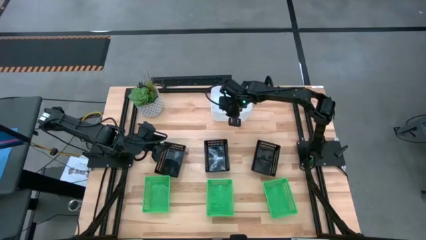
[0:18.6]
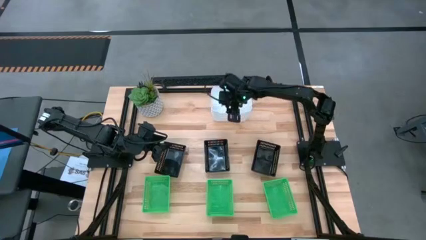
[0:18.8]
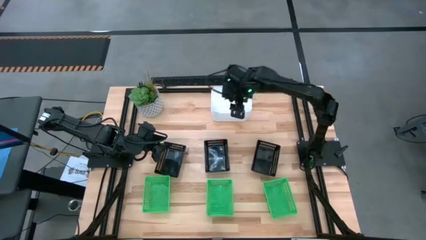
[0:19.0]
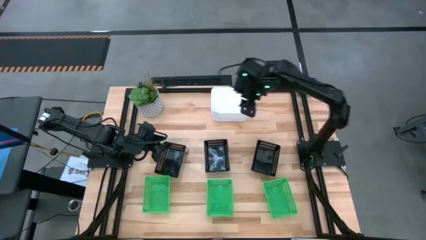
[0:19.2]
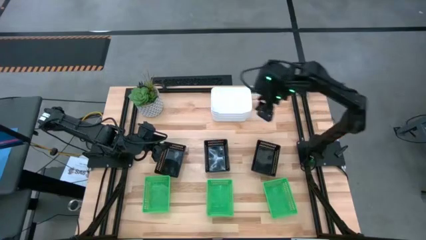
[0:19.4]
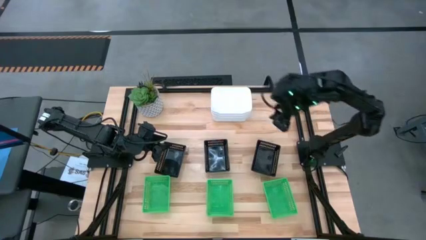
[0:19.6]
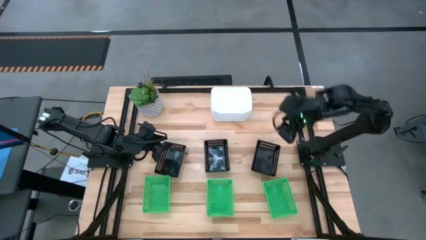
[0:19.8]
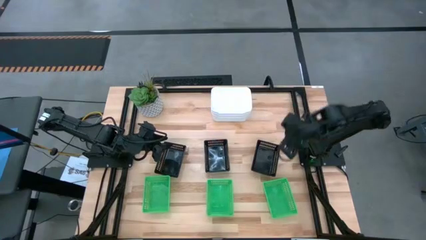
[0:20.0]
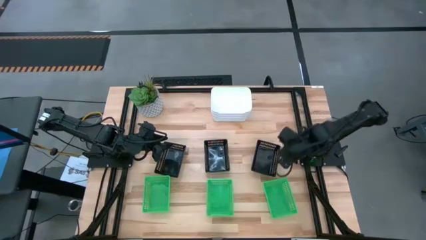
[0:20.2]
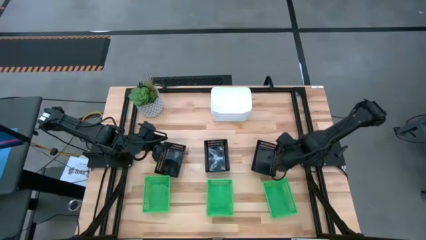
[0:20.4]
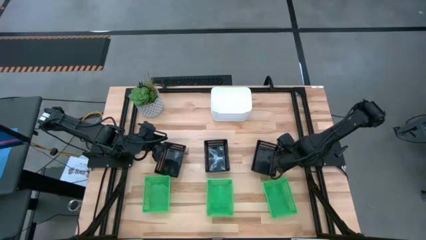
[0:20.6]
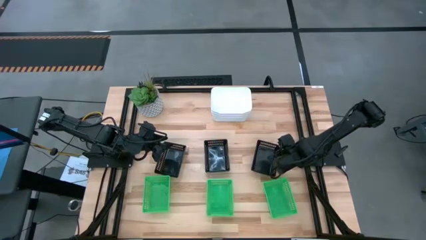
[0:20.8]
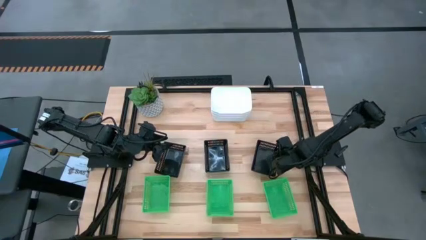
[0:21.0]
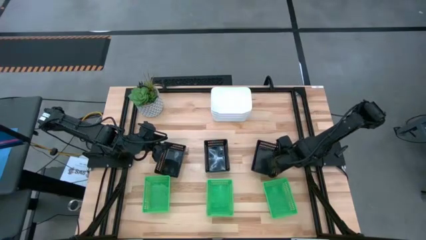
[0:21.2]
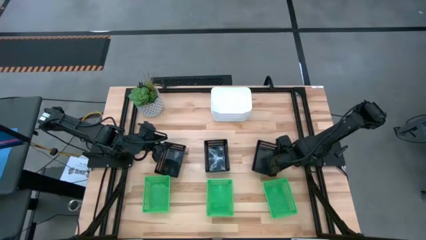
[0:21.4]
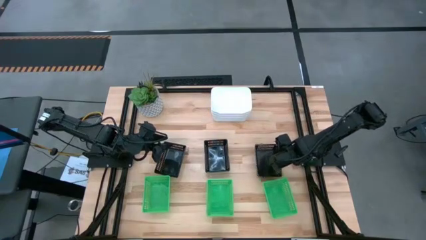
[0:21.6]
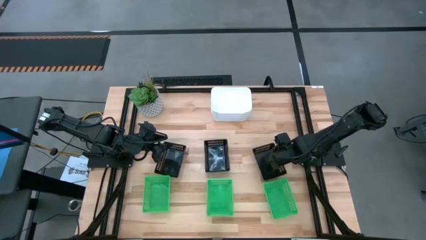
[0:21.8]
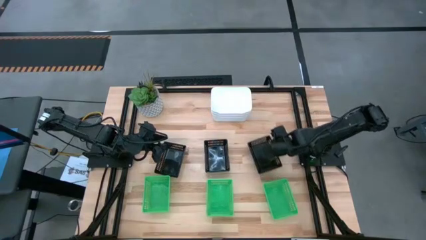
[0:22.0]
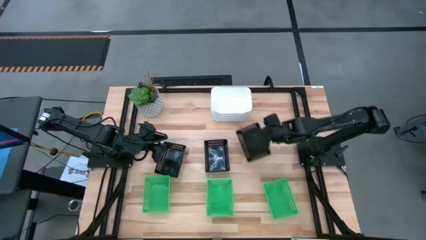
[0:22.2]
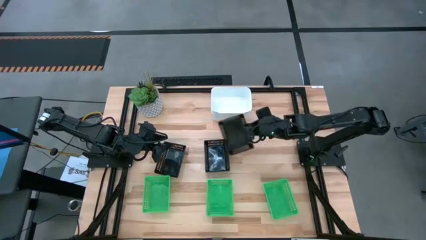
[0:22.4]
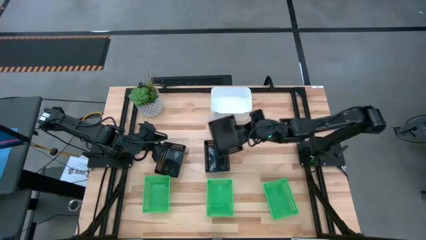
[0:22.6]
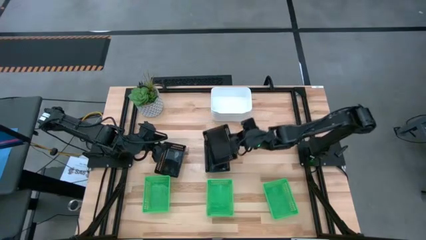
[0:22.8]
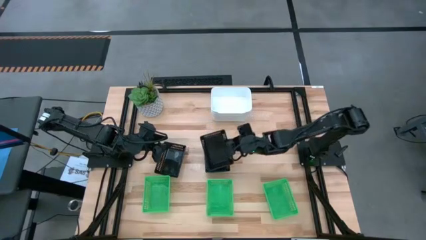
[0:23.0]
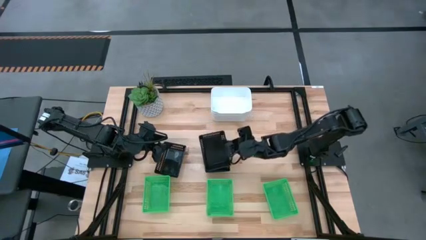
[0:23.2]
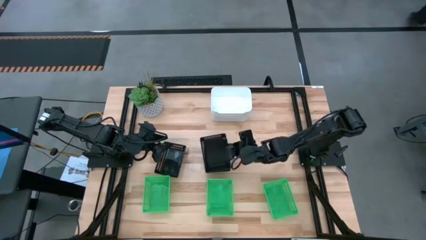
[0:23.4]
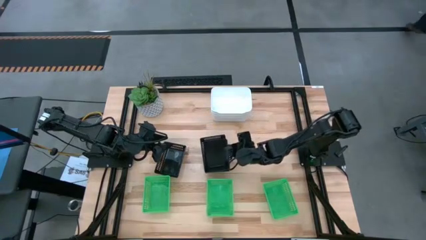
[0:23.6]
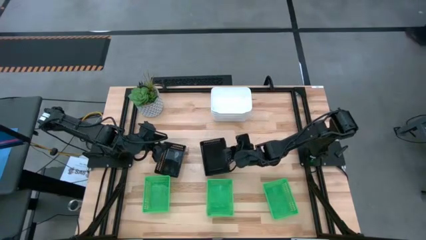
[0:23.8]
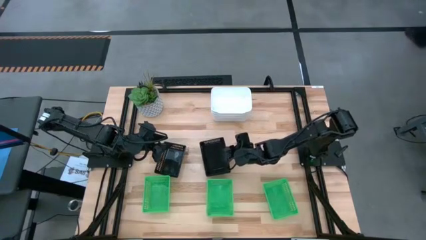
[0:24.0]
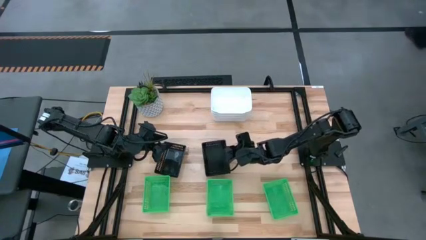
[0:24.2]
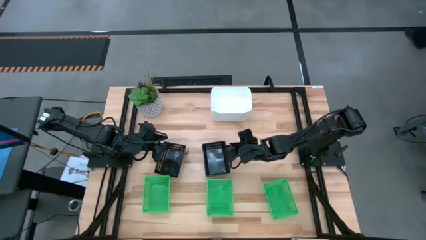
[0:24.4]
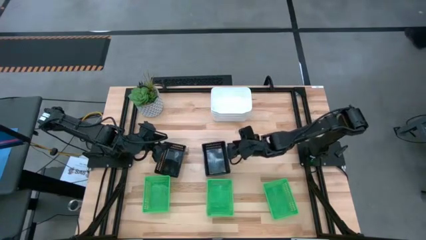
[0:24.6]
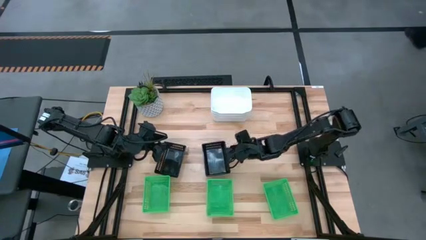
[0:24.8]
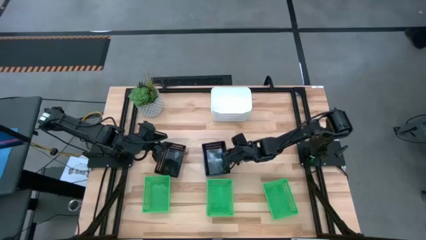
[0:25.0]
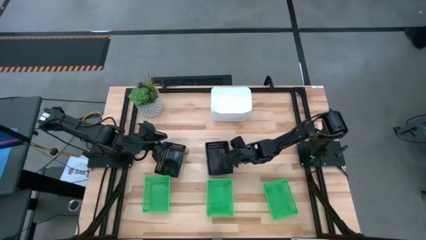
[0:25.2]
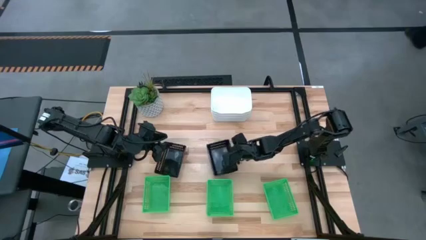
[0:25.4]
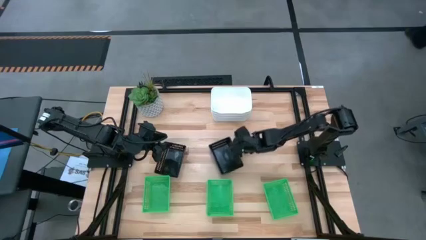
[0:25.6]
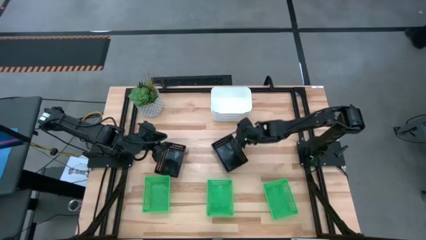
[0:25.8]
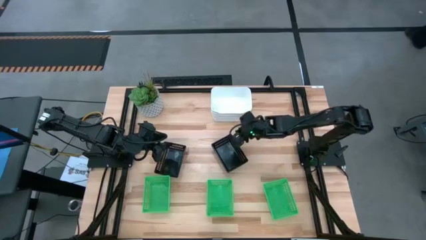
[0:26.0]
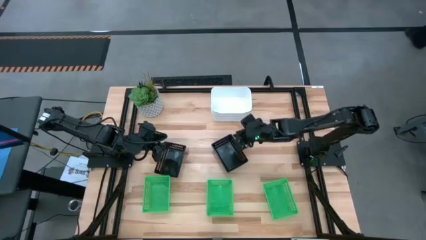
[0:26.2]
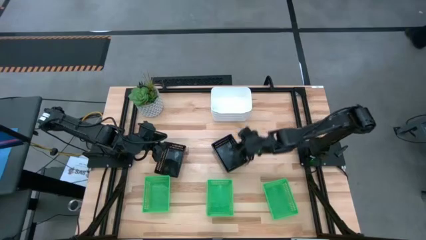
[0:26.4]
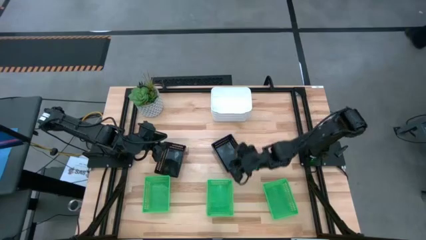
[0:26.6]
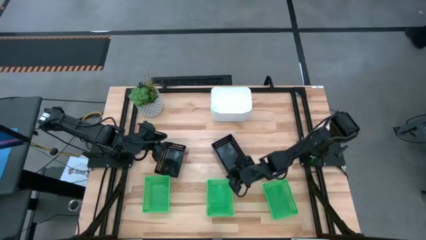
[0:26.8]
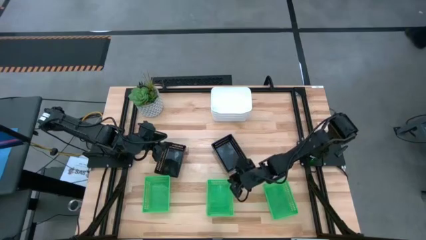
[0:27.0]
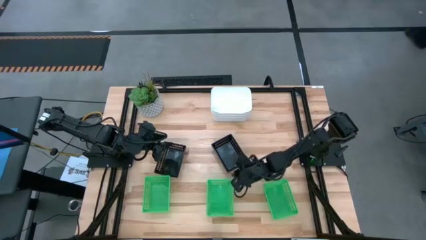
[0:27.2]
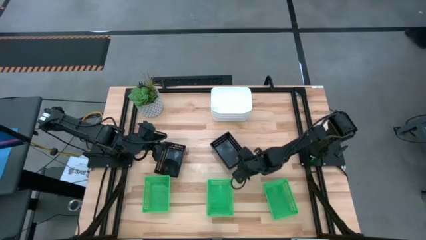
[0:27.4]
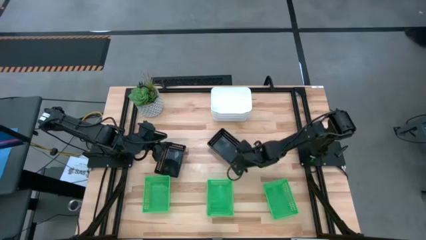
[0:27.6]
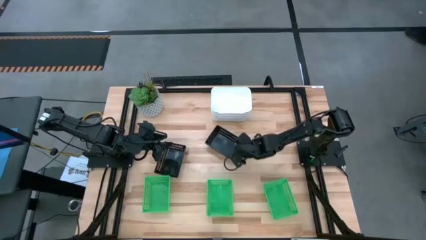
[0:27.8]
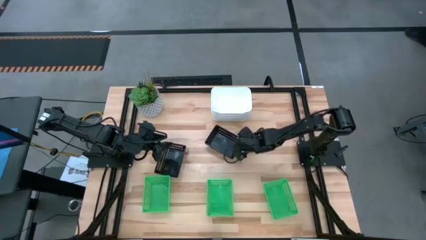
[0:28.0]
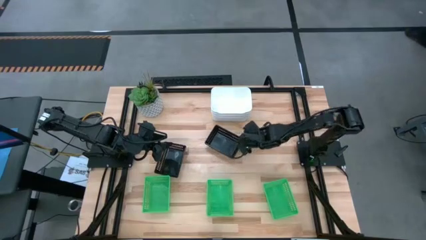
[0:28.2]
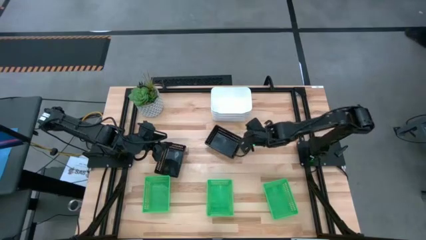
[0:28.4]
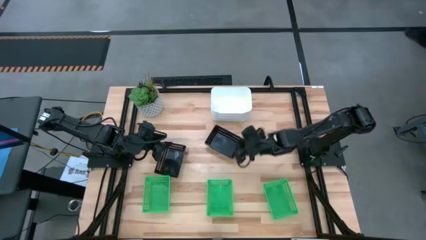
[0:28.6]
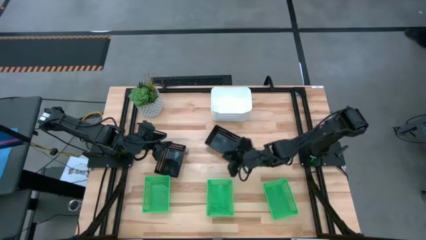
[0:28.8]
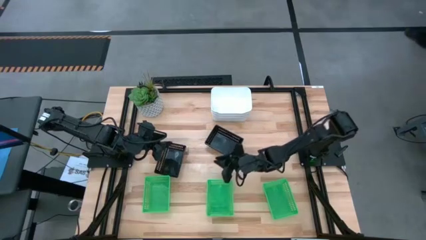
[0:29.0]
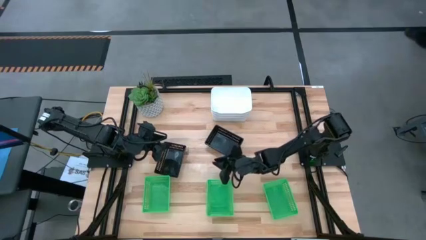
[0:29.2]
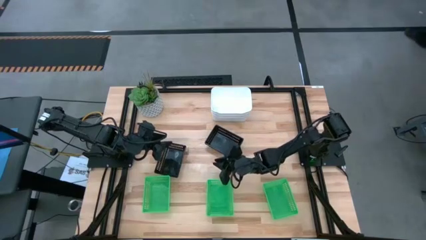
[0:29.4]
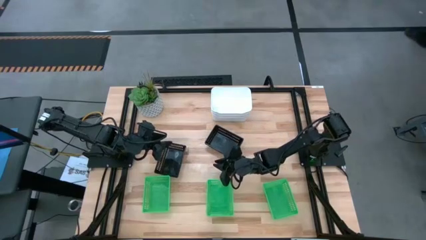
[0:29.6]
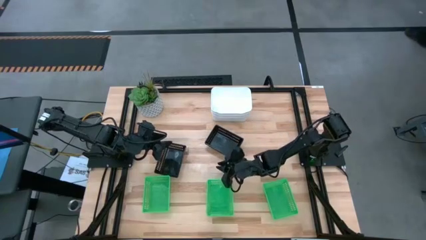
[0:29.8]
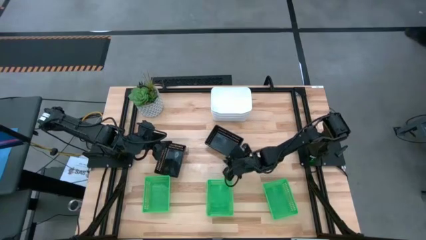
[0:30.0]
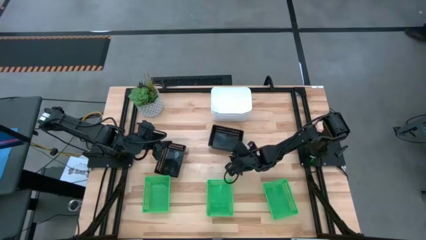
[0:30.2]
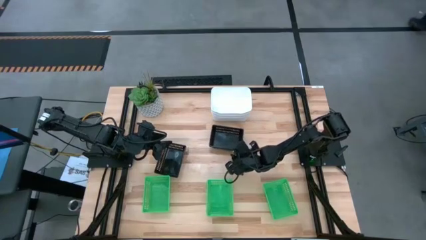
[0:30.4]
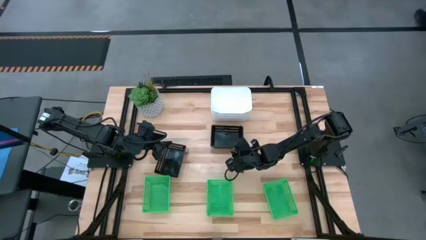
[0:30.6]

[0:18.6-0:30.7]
Stack the right black bin on the middle black bin

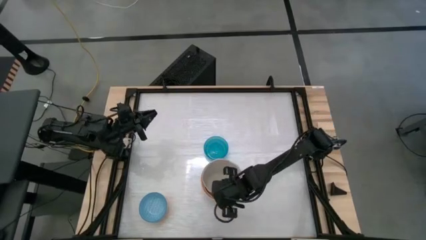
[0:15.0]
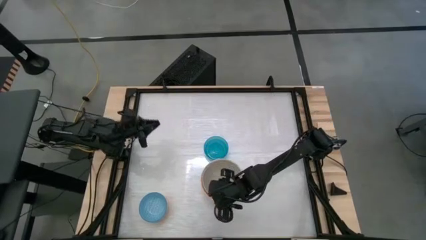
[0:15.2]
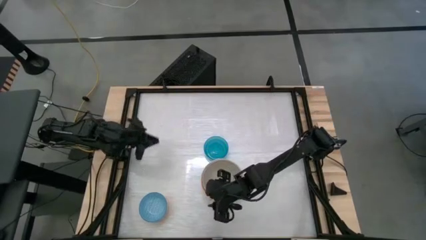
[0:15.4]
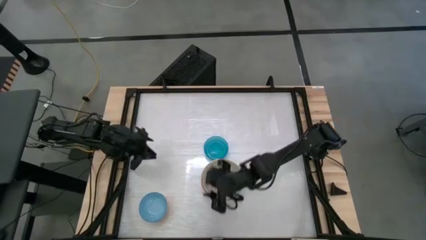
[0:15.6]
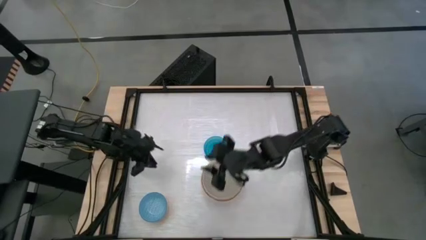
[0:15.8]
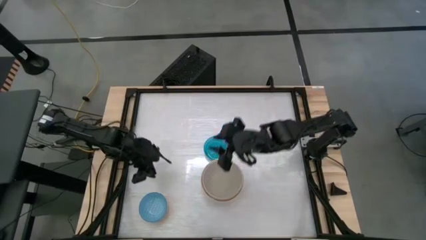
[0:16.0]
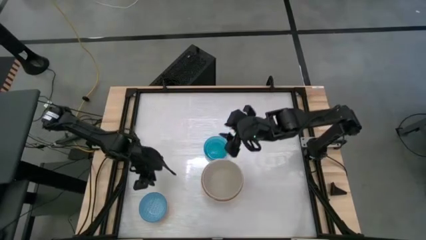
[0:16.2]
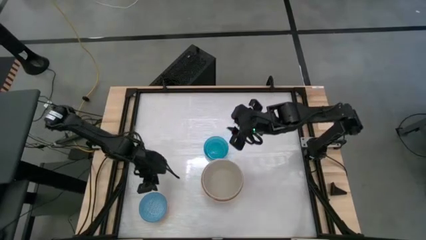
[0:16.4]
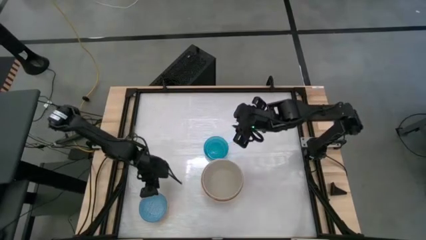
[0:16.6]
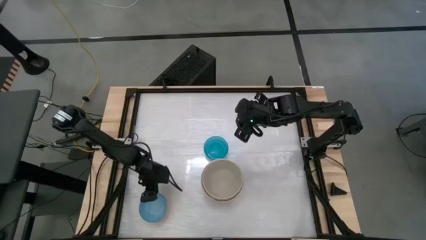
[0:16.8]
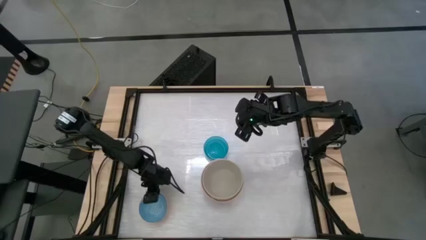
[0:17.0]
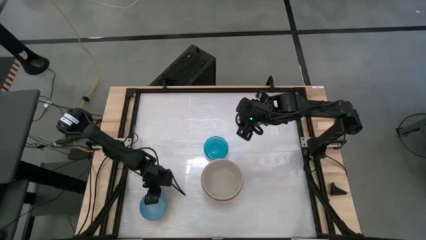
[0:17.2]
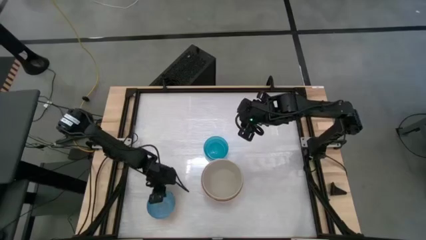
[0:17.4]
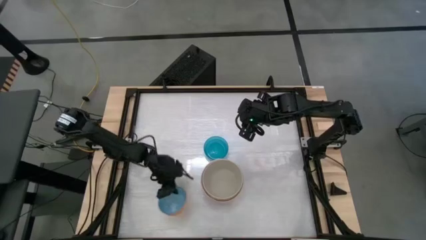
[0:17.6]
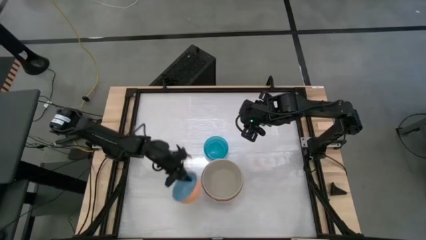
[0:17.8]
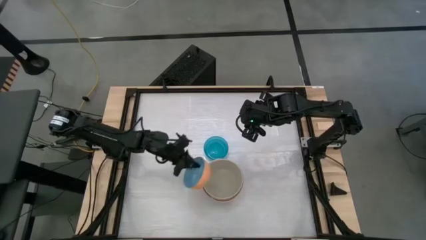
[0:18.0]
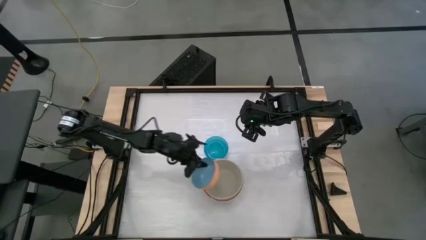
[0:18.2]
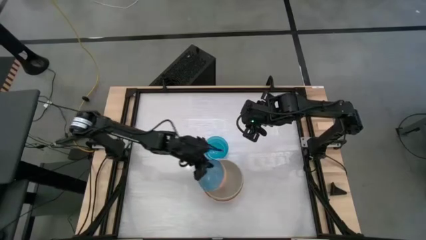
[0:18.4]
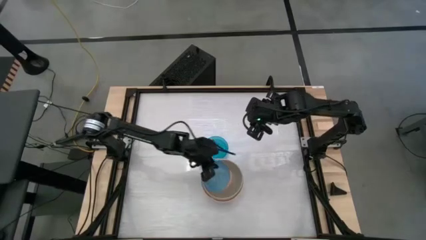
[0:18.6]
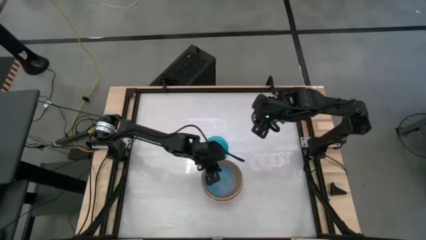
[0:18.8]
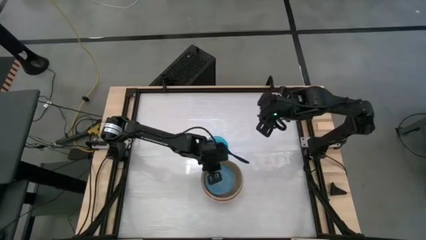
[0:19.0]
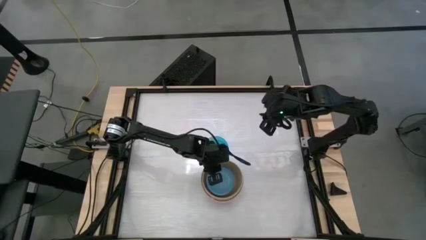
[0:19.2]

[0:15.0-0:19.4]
Stack the blue bowl on top of the gray bowl

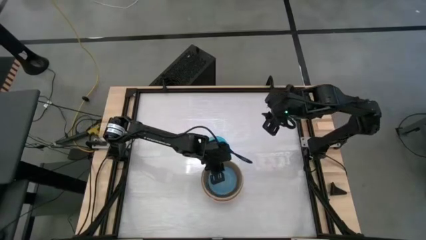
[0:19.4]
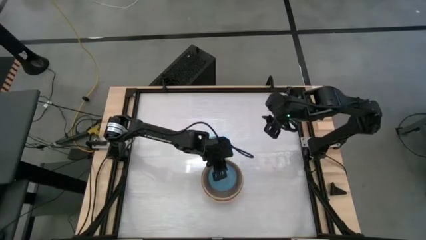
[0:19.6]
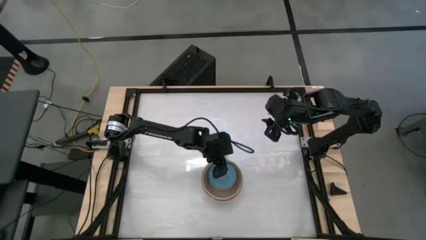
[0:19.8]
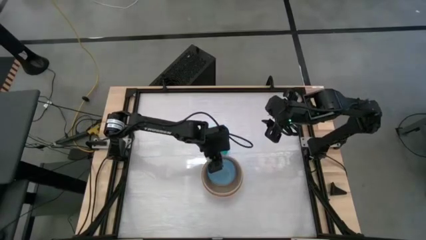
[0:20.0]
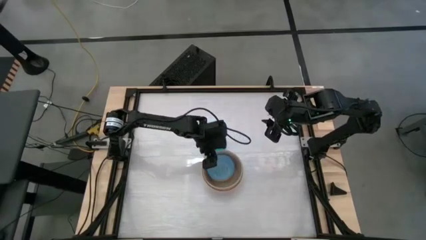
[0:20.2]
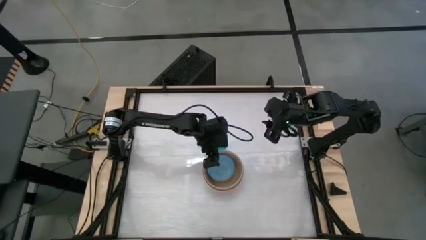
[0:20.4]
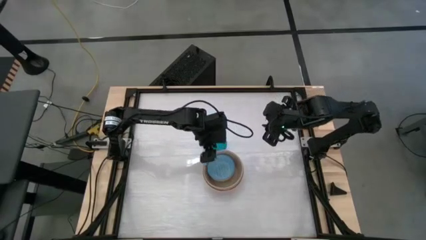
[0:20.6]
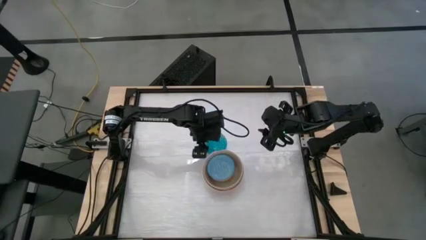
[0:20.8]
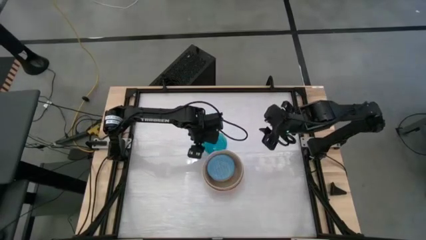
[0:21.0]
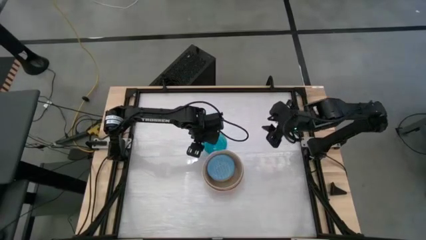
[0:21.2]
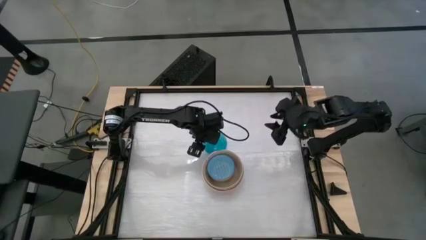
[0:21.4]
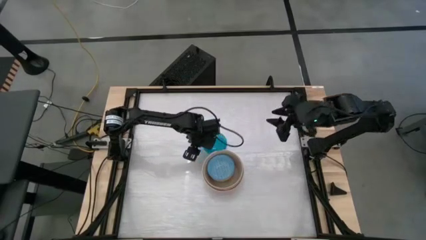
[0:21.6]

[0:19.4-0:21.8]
Stack the light blue bowl on top of the blue bowl
